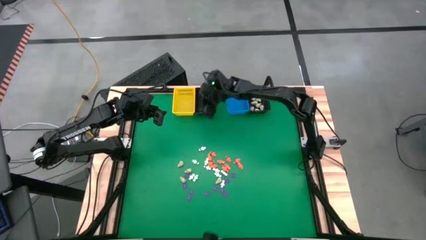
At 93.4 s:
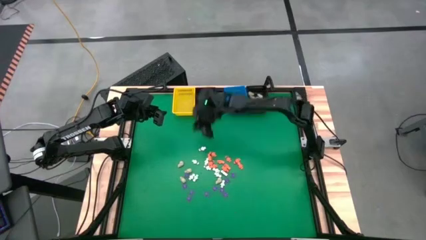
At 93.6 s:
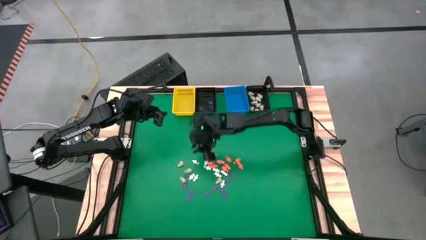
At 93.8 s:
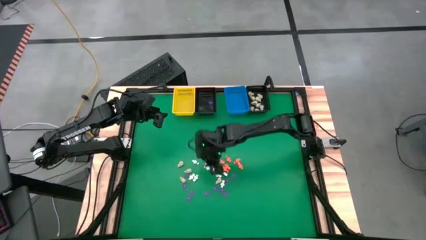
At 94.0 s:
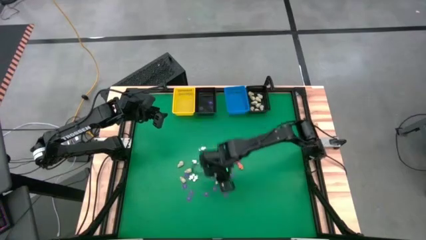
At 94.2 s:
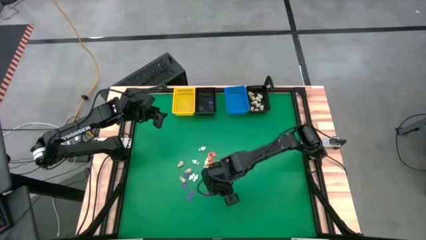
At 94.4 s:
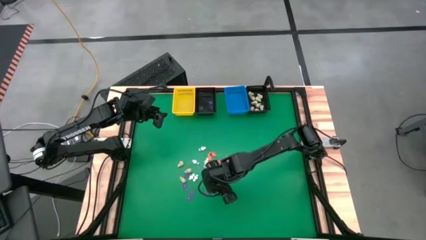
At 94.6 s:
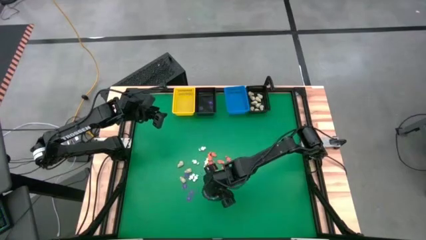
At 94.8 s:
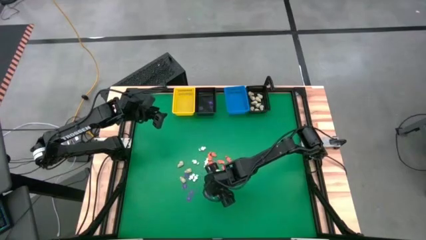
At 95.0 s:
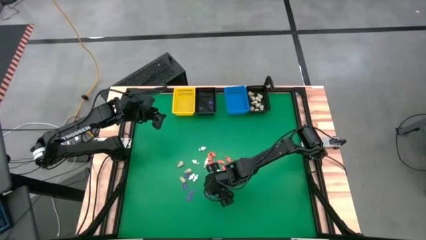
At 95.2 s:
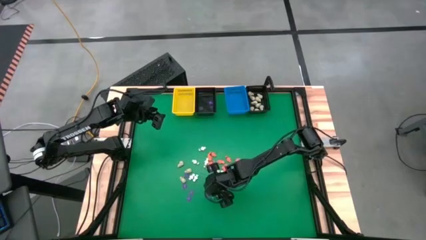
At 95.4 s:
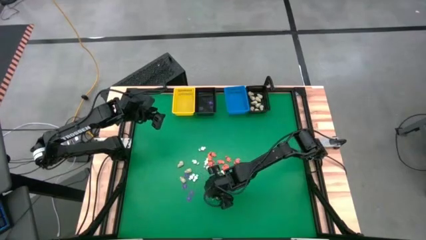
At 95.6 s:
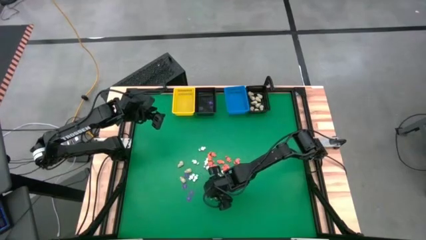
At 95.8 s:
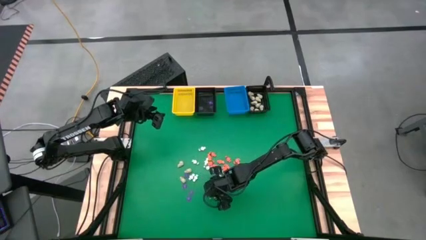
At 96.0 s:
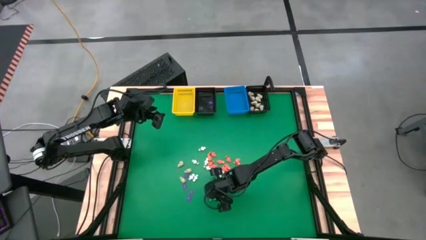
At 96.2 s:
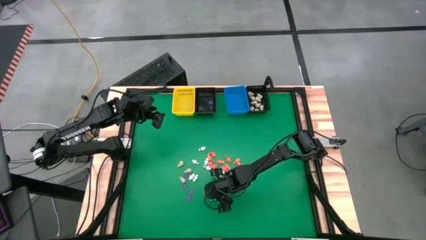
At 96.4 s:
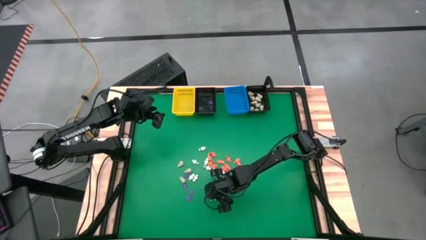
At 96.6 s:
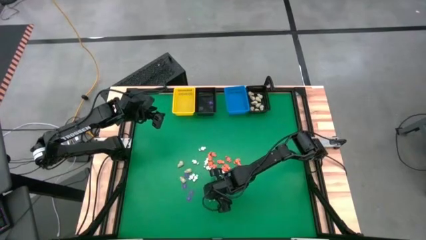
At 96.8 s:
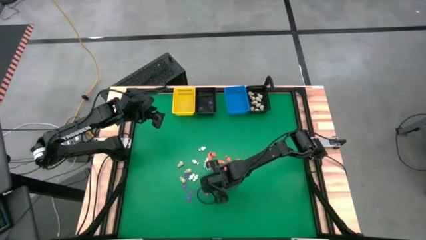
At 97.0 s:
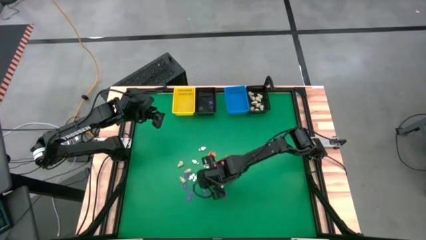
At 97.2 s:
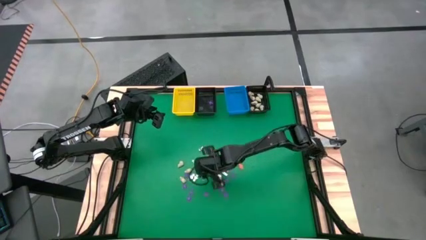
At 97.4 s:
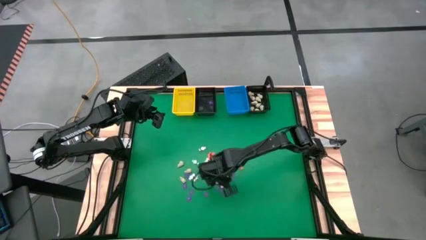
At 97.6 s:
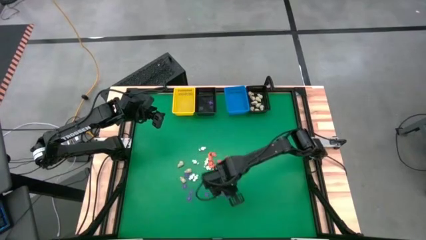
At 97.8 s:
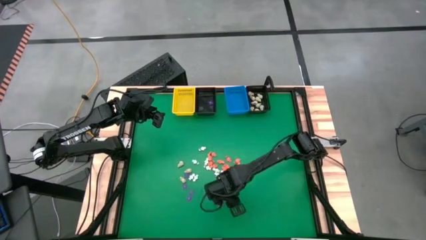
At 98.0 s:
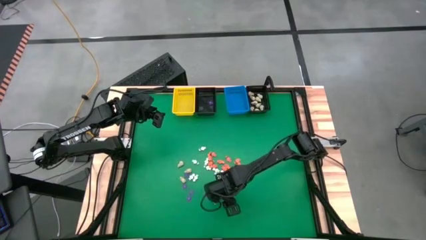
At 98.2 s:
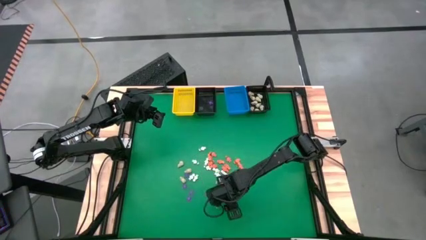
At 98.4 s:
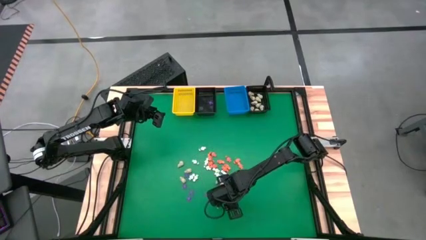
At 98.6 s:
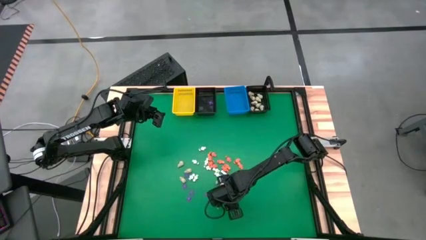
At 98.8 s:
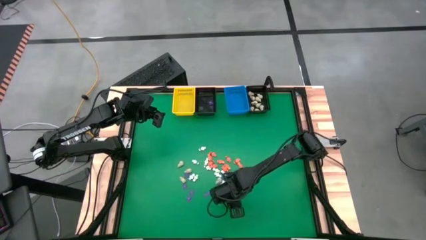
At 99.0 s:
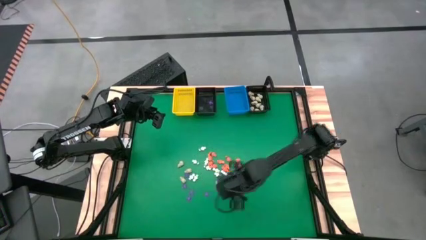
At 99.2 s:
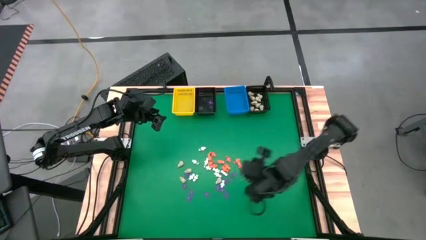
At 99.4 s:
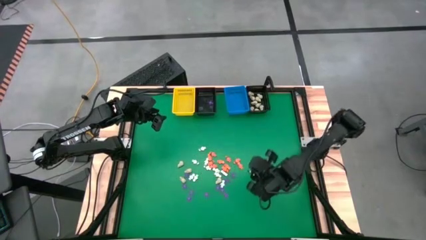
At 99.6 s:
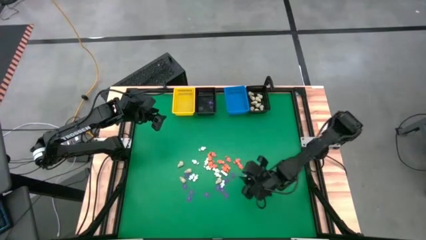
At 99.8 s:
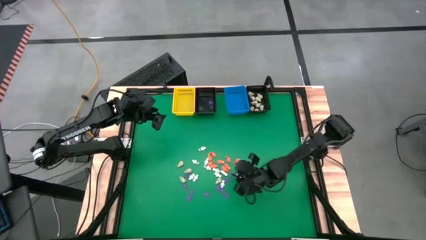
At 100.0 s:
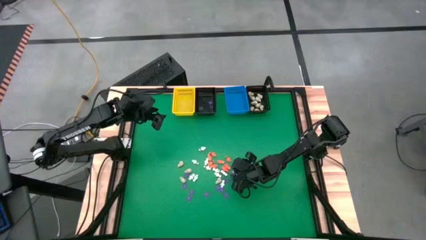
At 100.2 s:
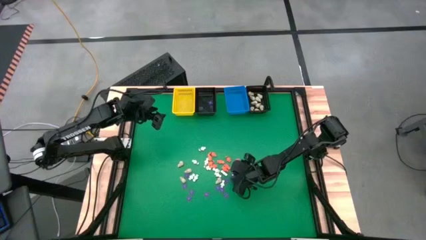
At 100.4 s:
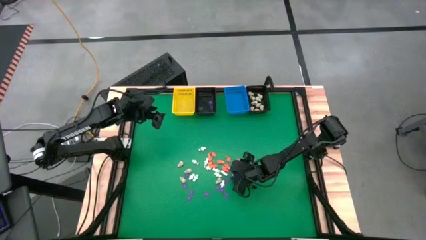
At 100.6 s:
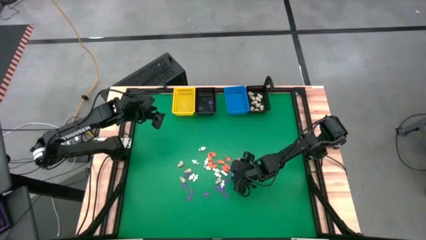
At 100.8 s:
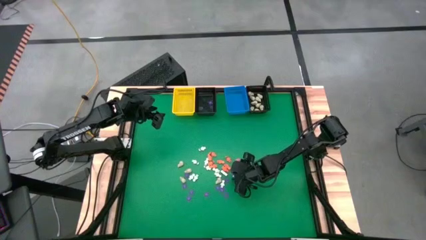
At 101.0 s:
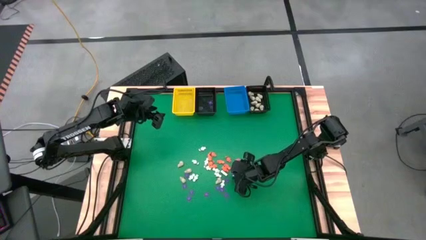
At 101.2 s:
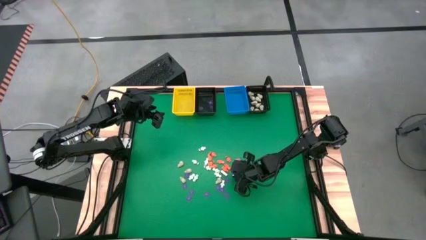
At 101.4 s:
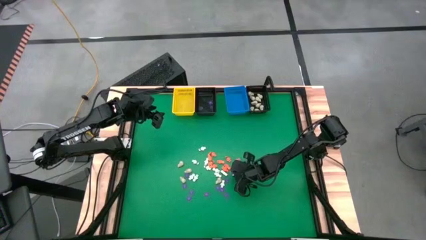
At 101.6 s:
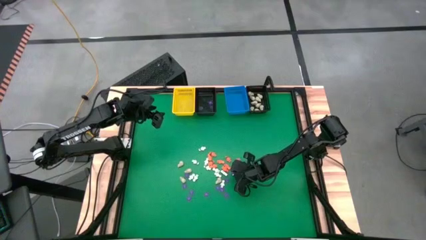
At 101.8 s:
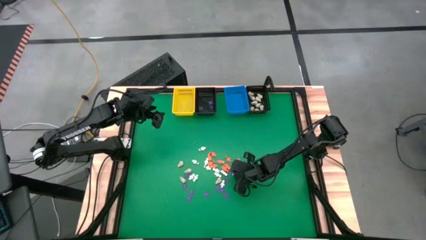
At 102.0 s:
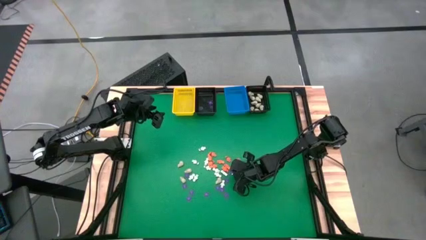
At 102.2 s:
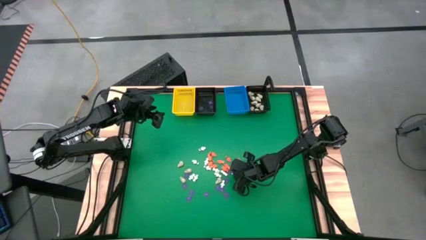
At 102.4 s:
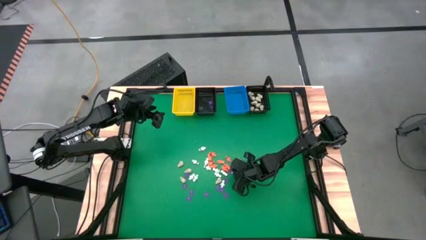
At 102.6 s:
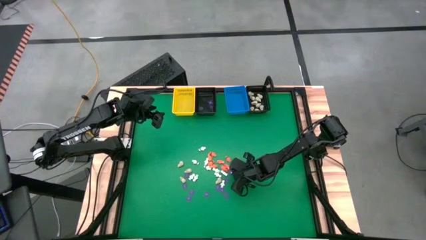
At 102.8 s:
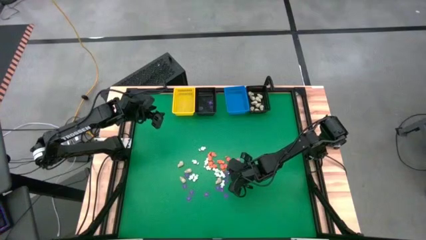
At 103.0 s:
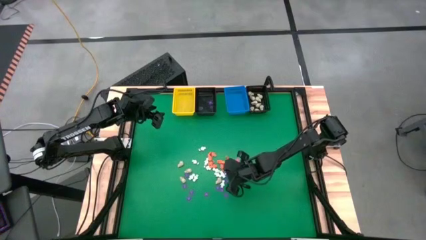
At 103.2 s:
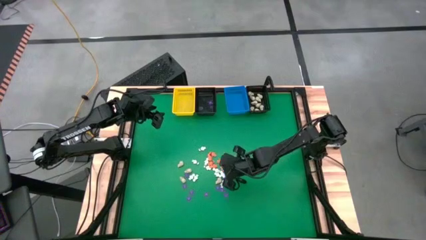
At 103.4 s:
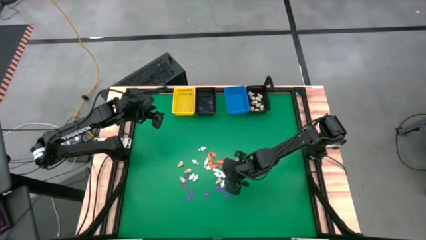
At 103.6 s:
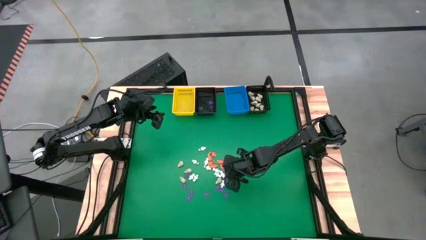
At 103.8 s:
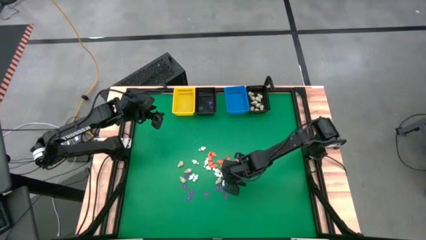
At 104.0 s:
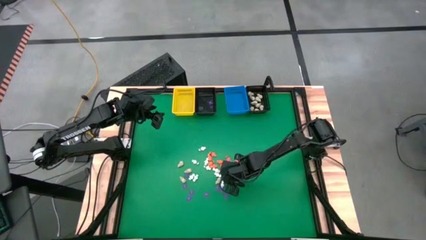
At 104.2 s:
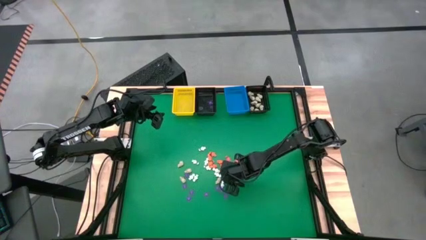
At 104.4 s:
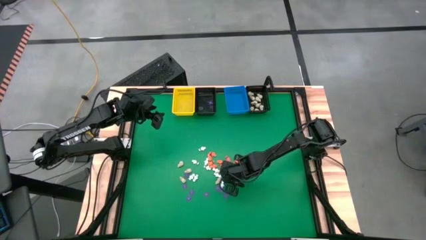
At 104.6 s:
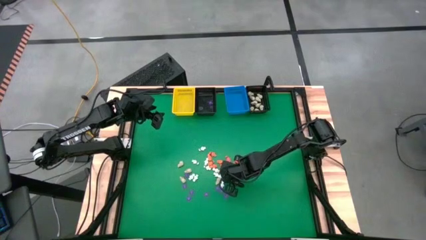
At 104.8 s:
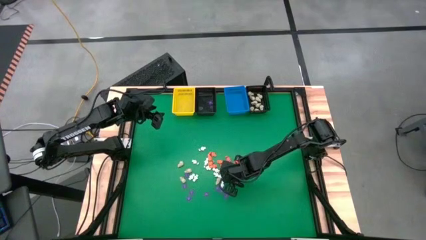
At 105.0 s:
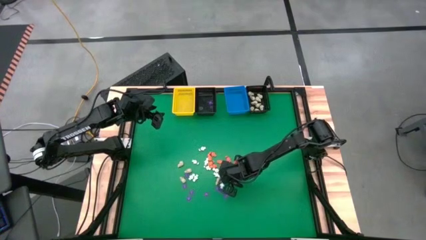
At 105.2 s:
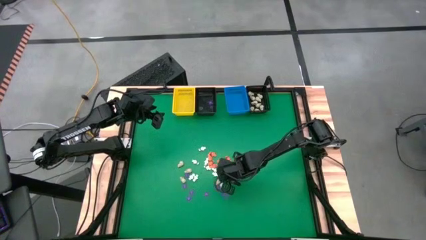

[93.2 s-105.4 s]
Task: Sort Halloween decoration
Put the purple spider toy into the left black basket

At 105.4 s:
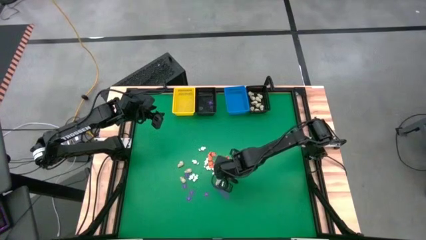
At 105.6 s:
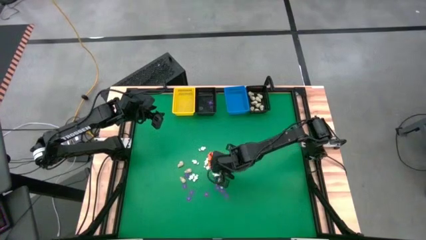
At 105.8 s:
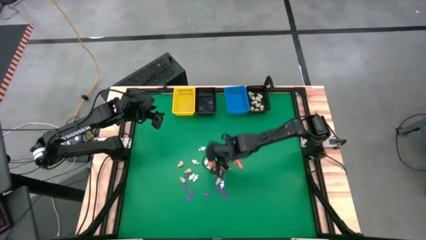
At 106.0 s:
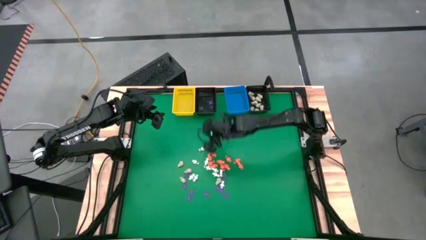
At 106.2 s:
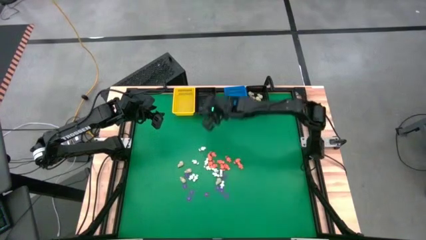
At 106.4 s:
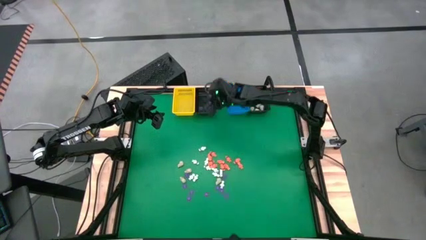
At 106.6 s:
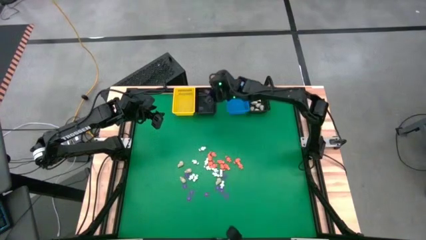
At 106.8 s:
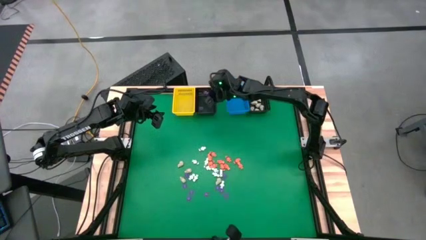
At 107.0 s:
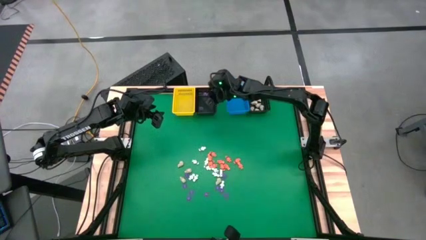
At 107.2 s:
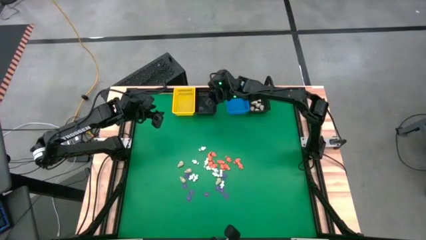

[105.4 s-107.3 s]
Put the purple spider toy into the left black basket

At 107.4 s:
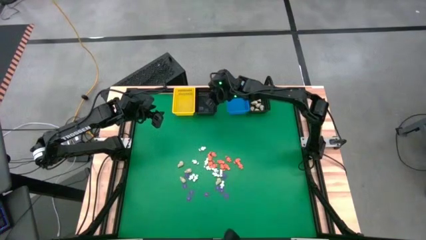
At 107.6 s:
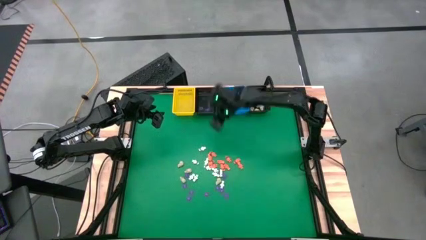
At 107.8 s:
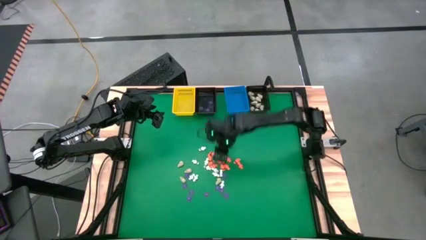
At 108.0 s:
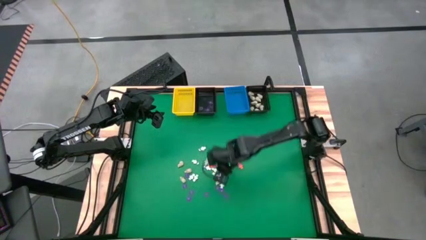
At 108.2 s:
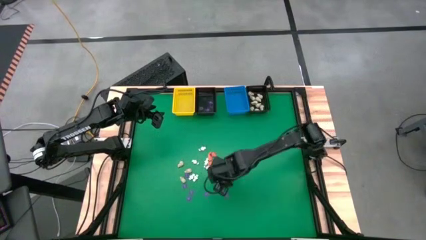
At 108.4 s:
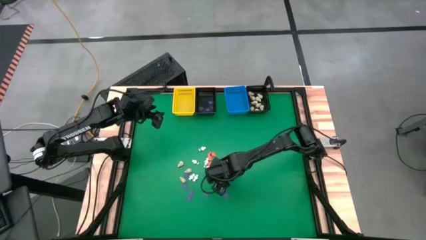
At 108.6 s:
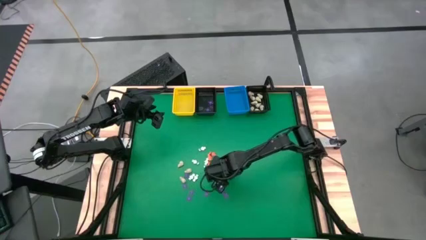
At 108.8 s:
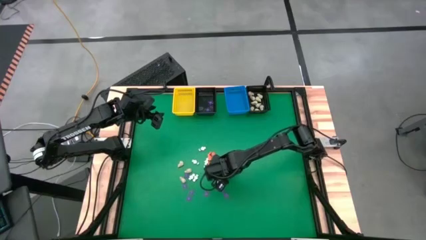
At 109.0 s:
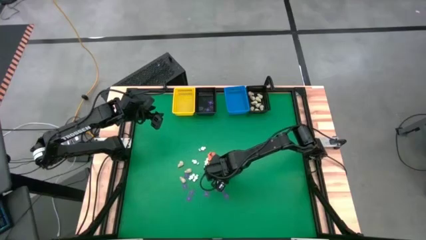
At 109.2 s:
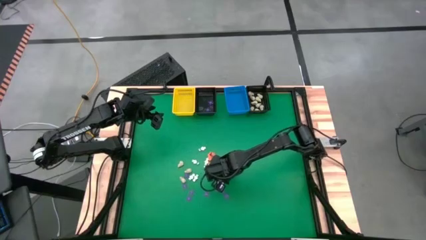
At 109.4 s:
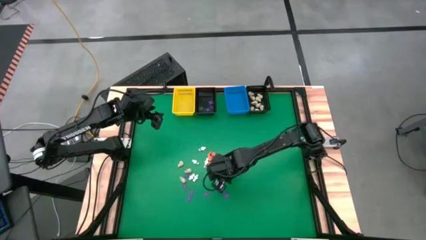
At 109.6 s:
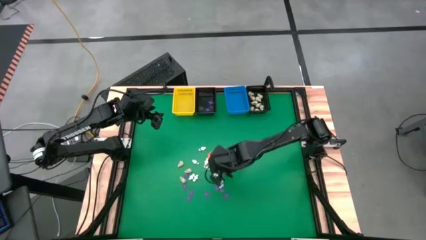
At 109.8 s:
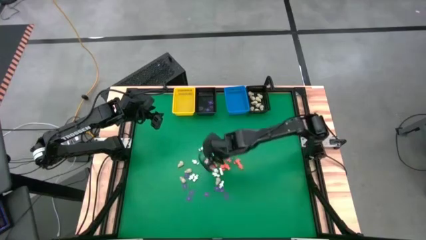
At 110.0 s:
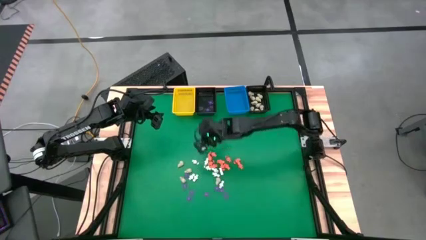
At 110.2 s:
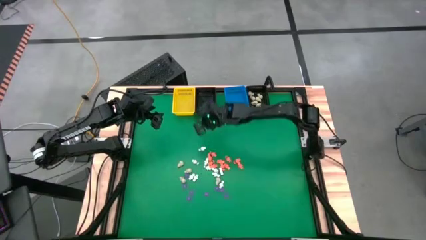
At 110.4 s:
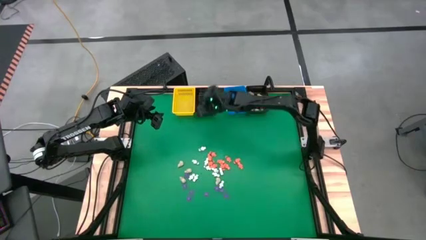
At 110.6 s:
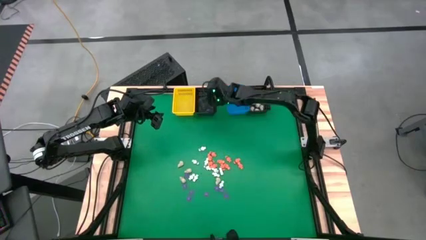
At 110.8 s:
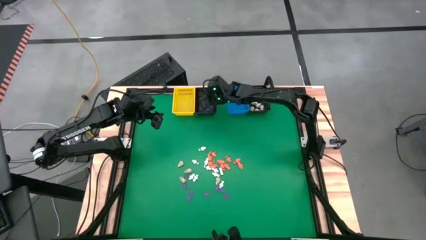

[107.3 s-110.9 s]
Put the purple spider toy into the left black basket
